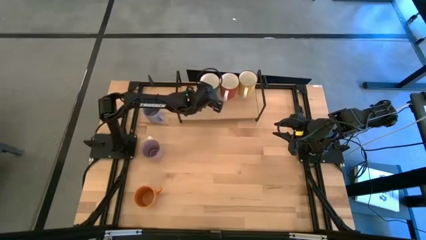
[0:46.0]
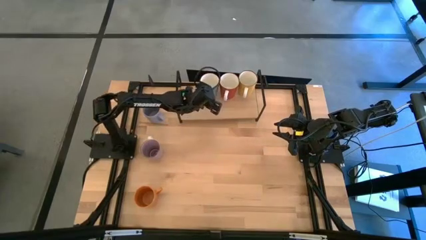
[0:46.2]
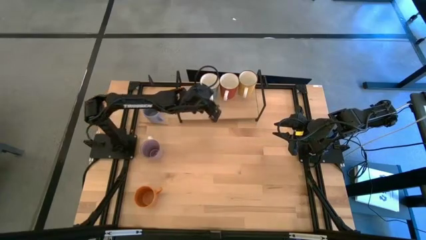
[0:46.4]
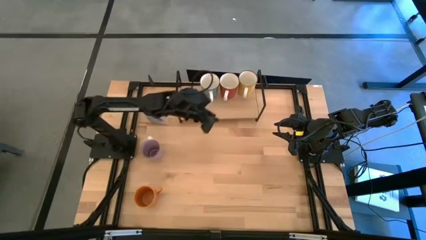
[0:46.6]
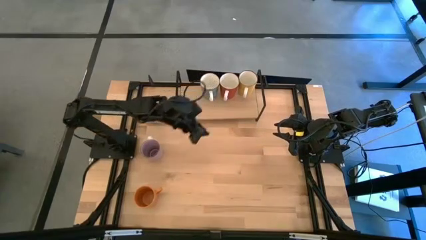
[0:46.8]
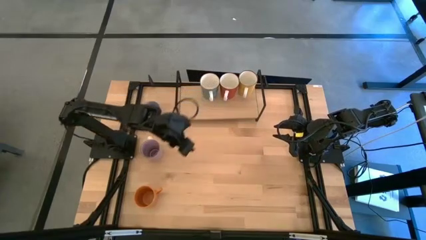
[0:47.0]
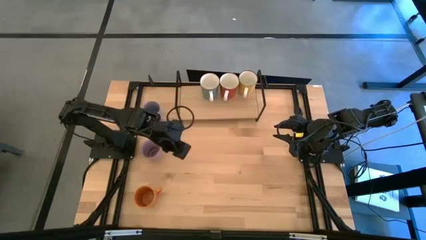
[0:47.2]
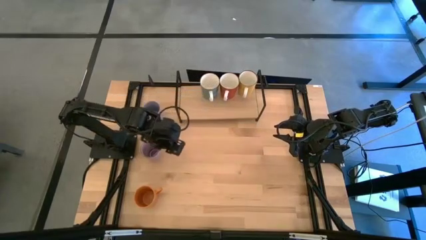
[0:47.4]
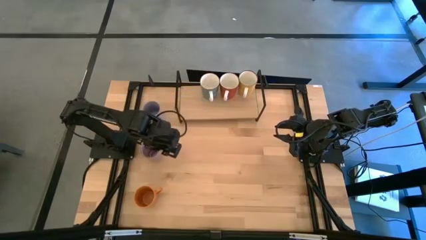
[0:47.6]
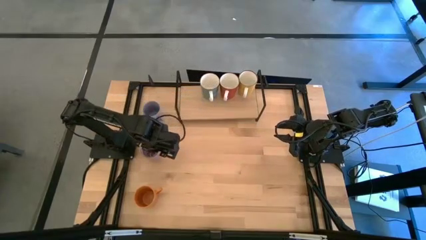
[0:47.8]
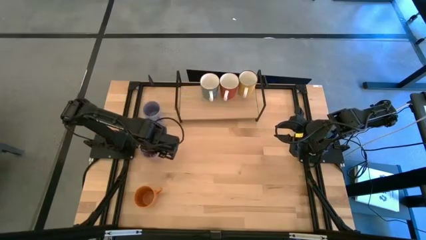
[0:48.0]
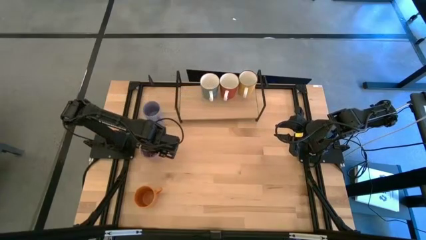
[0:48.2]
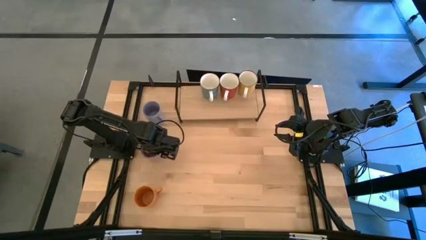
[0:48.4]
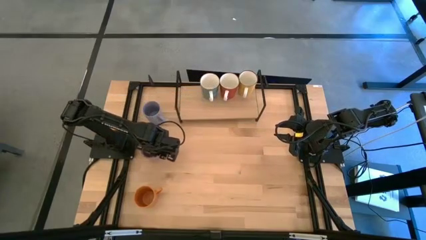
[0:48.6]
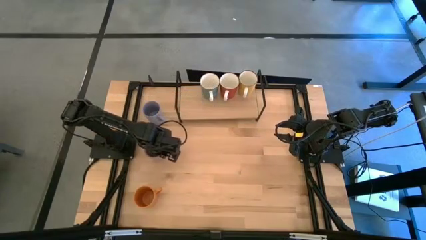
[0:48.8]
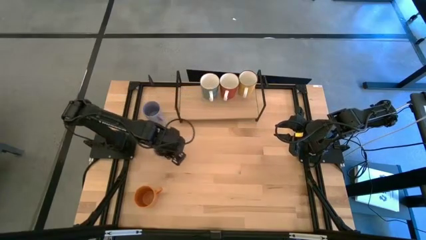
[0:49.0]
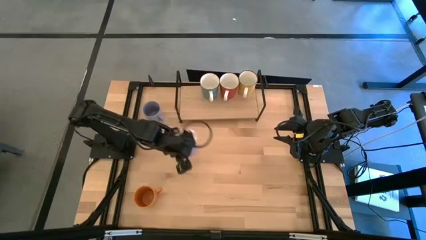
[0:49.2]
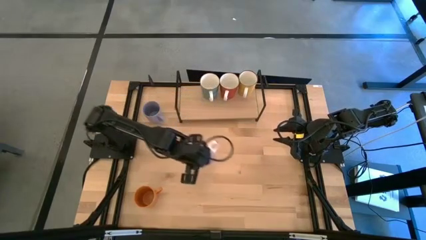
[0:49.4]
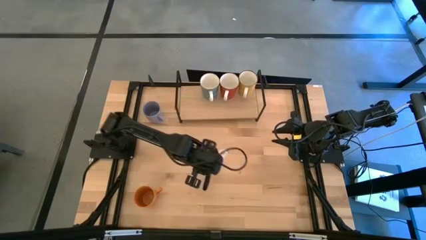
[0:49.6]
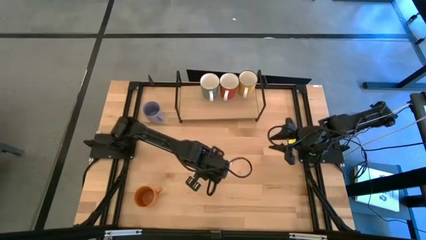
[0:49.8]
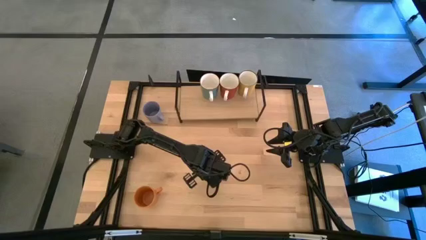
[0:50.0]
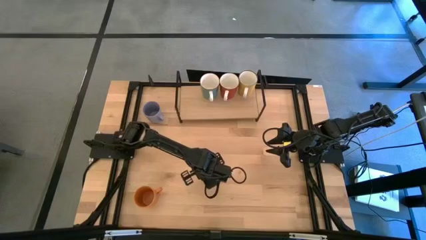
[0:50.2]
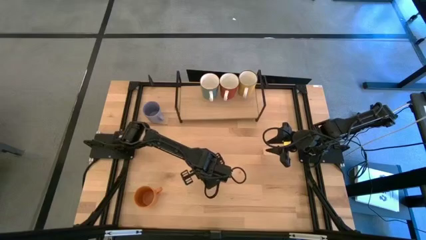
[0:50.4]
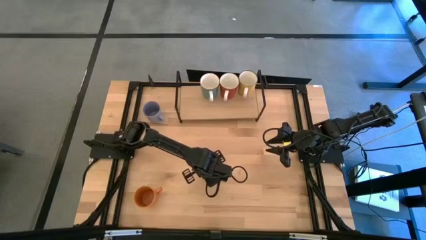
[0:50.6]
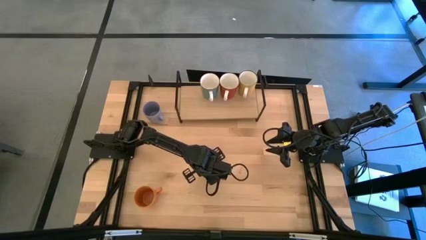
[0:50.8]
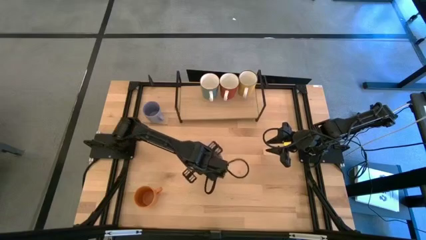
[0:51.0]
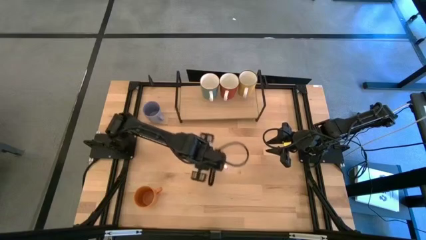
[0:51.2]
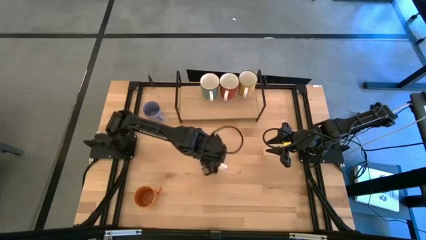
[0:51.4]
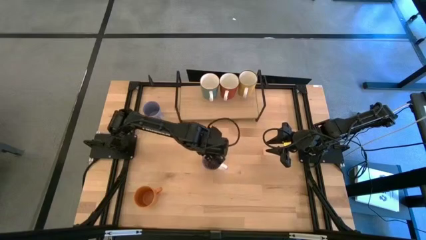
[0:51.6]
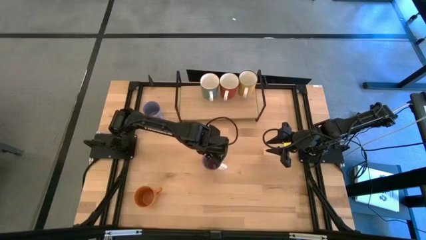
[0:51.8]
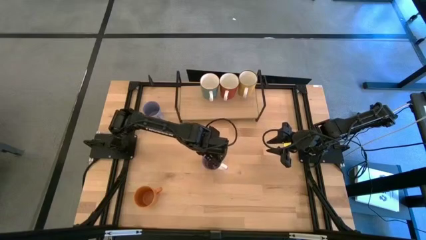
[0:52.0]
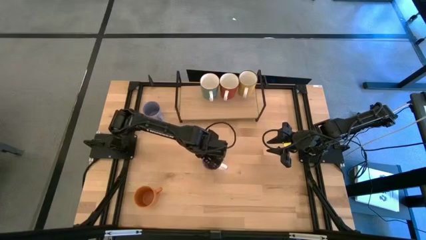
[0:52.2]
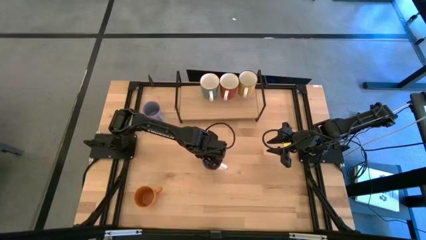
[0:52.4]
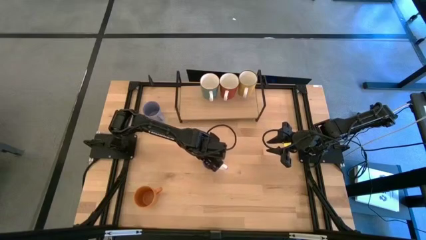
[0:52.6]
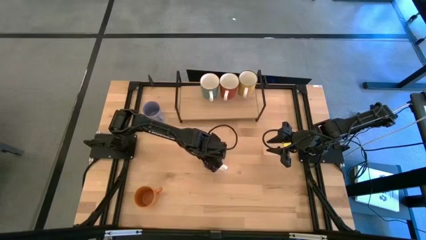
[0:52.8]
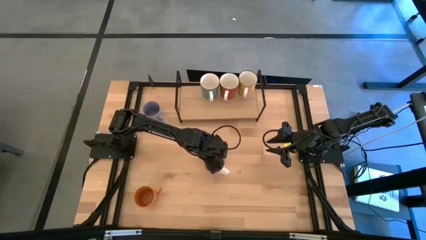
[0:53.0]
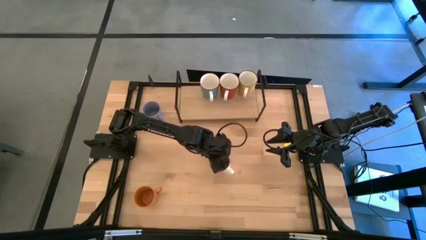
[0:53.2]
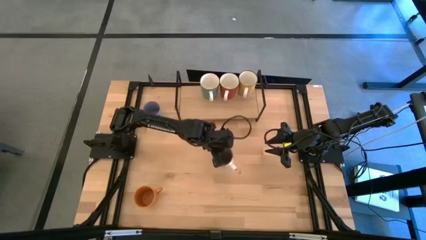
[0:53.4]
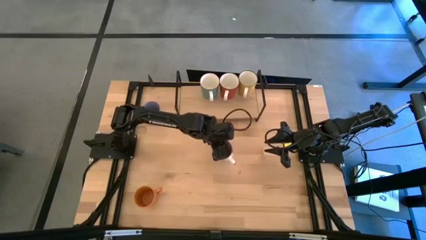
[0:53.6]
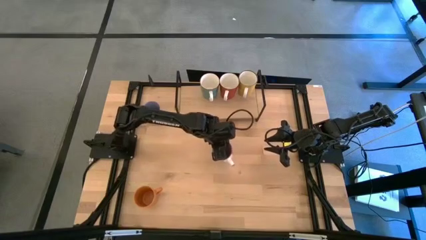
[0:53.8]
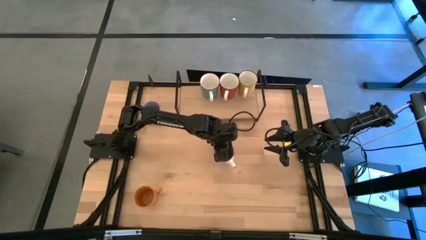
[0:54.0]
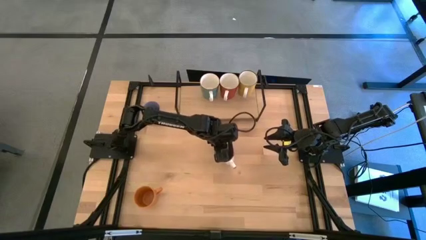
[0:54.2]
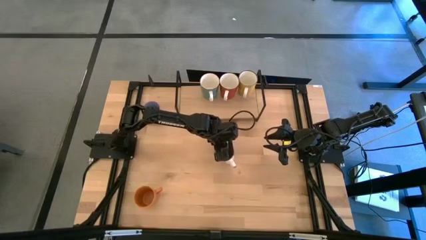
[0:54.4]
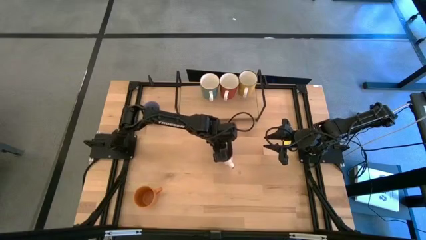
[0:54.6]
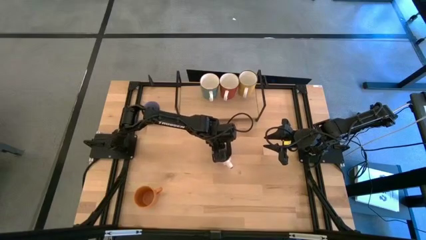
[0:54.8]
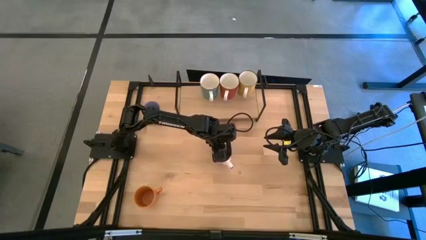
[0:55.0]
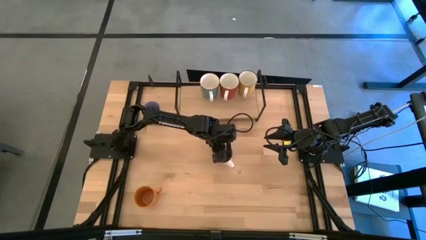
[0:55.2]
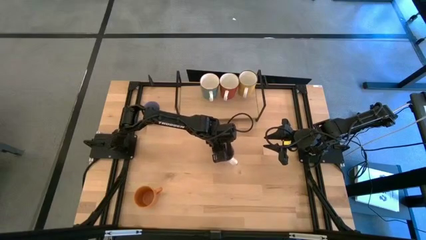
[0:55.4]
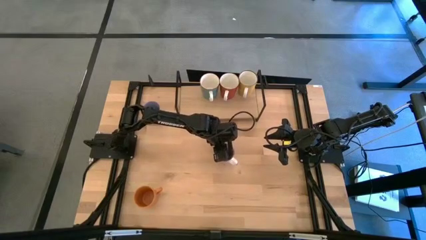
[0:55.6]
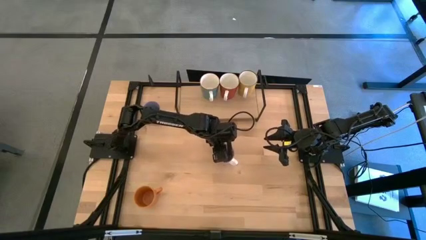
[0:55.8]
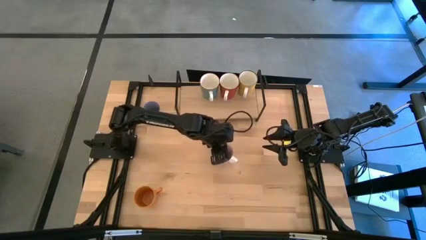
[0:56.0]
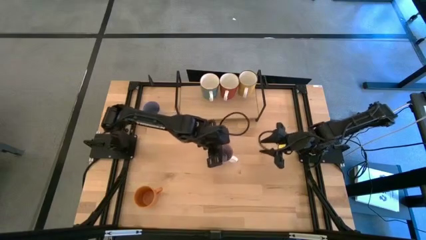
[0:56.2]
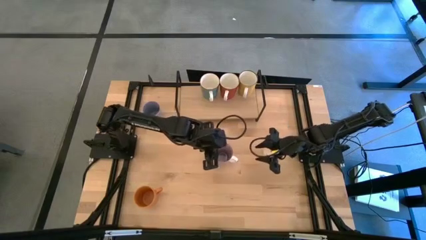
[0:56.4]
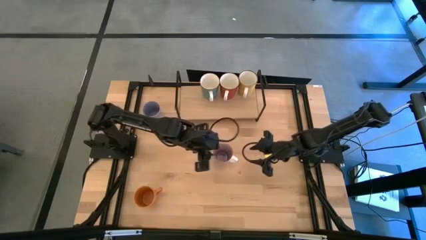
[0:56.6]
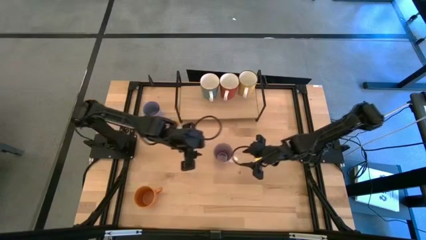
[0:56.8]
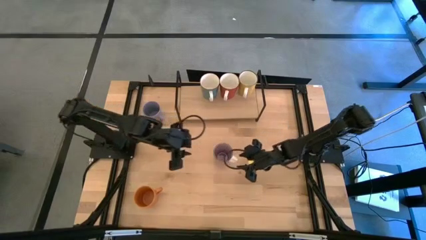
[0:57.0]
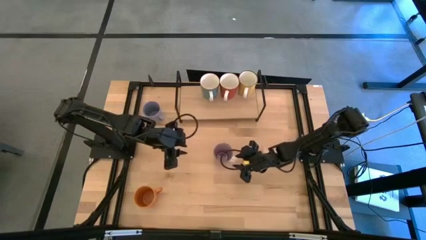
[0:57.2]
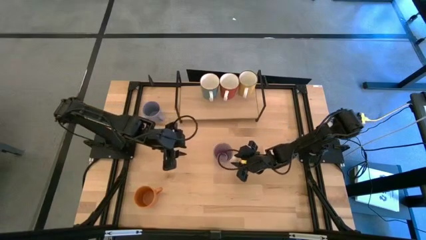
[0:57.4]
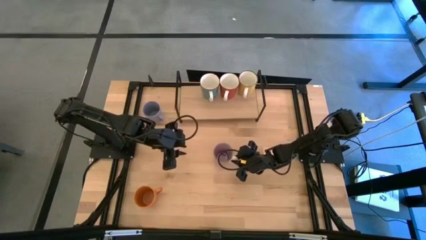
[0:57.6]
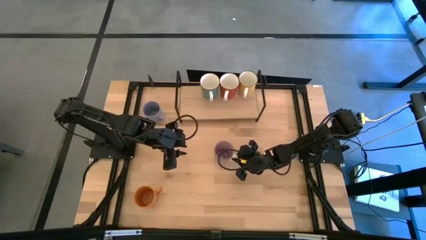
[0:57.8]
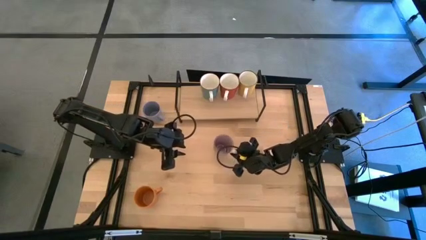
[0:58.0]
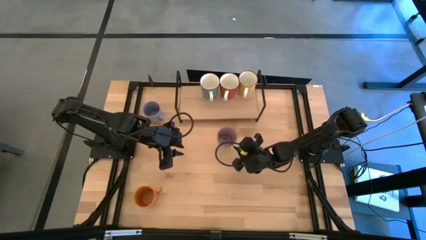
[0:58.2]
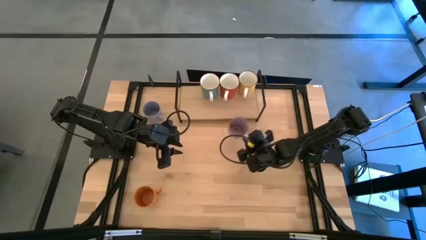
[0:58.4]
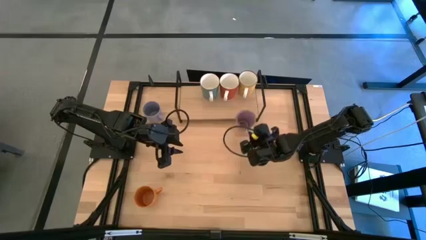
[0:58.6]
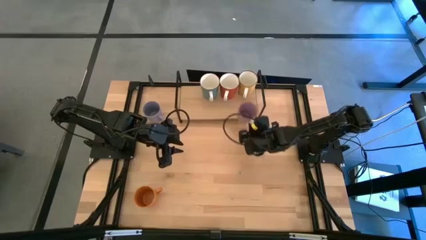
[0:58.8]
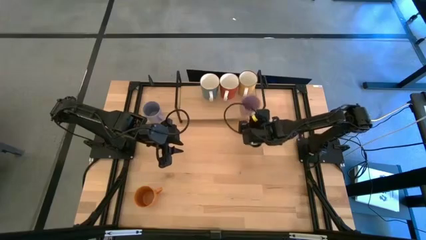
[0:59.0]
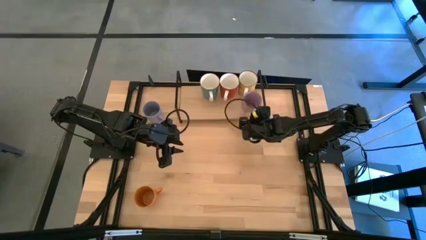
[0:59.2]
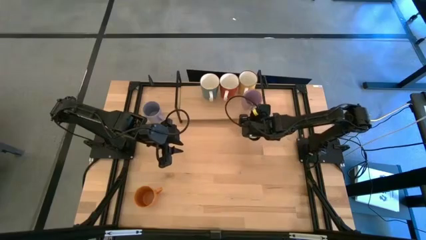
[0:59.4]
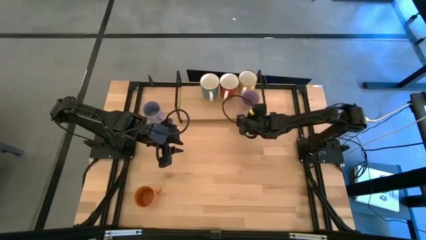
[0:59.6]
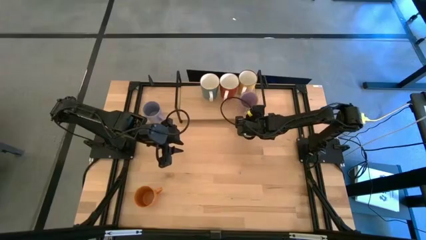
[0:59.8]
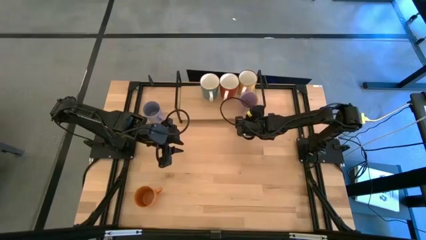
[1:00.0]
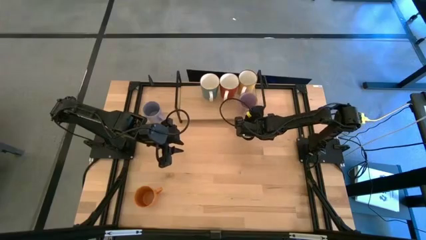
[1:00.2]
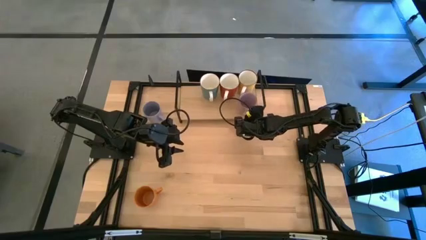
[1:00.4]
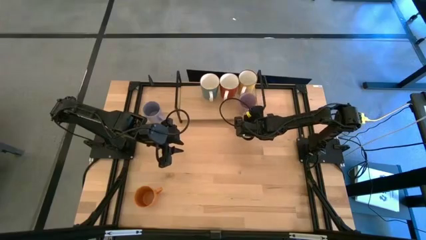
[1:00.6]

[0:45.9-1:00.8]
Task: Place coffee mugs
Put the purple mug on the shelf
